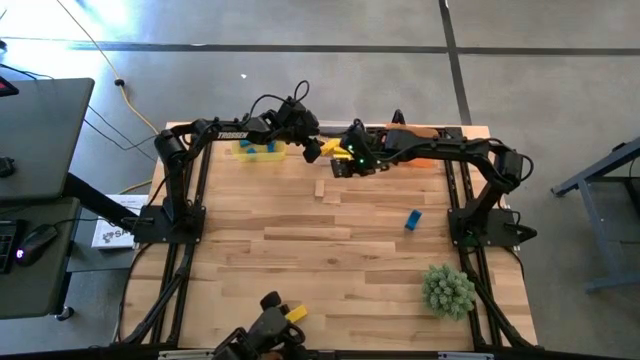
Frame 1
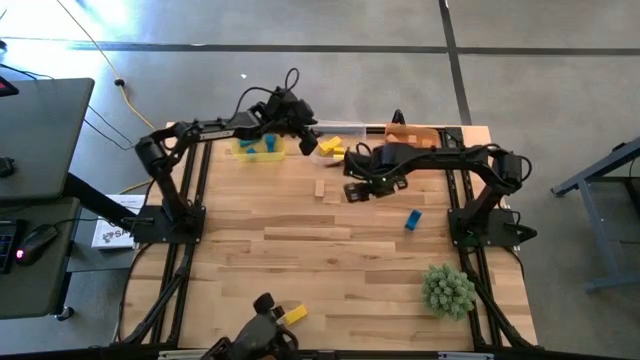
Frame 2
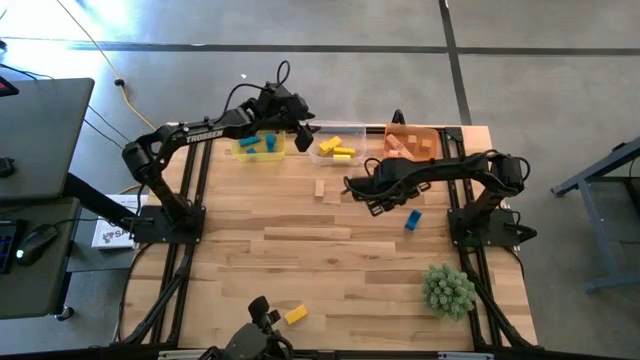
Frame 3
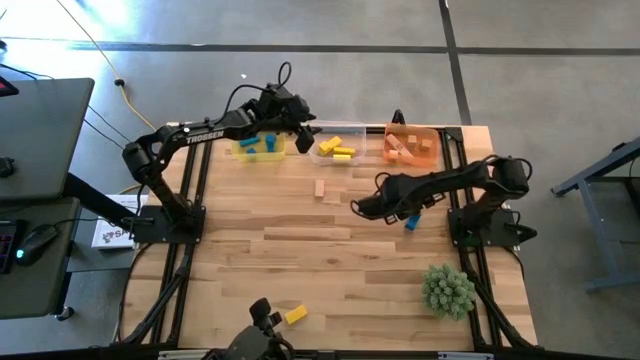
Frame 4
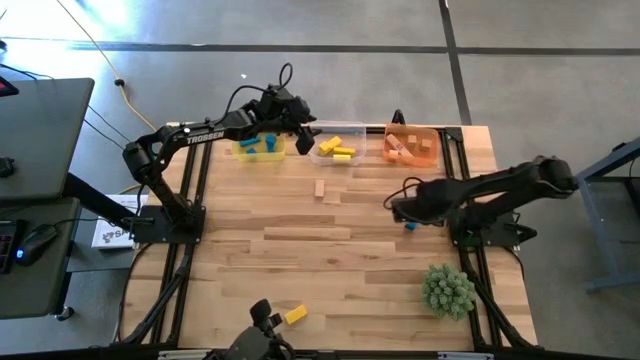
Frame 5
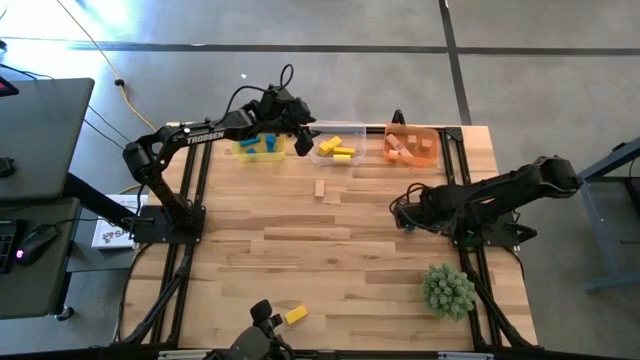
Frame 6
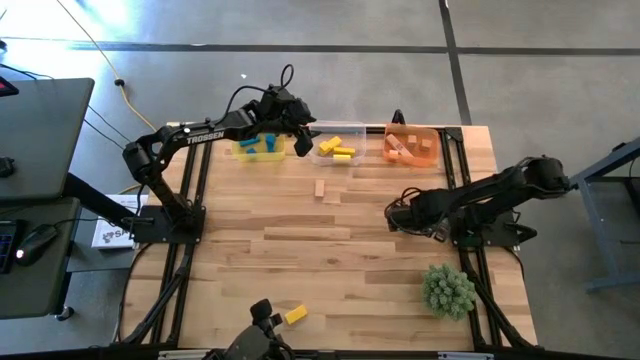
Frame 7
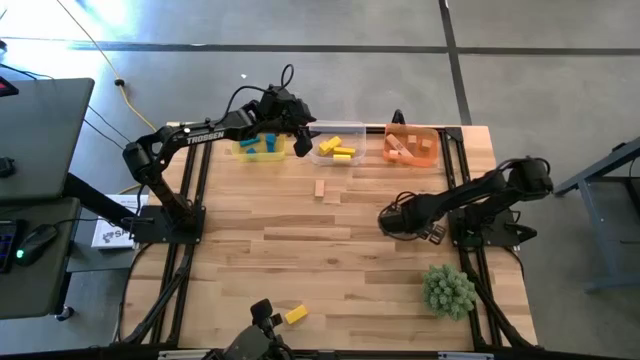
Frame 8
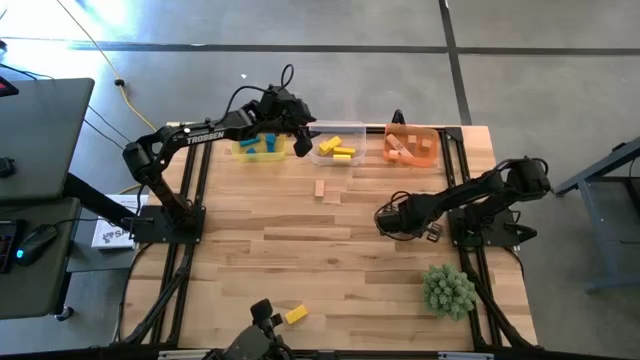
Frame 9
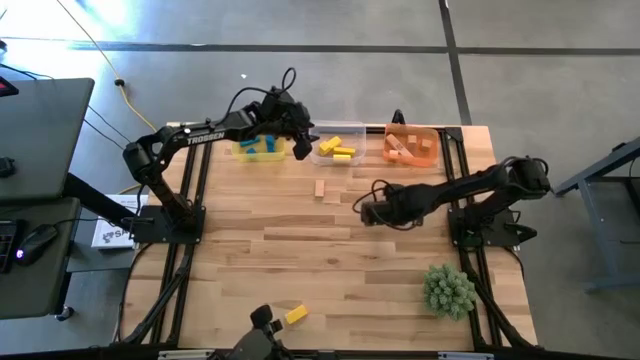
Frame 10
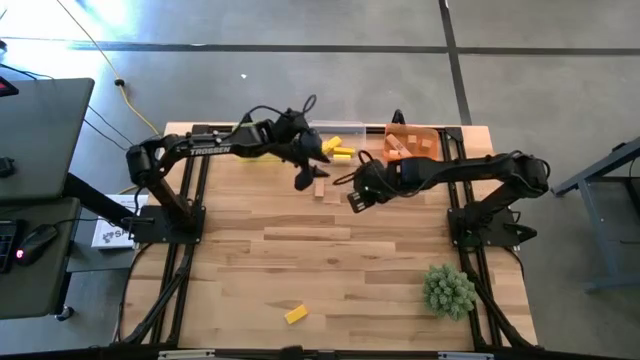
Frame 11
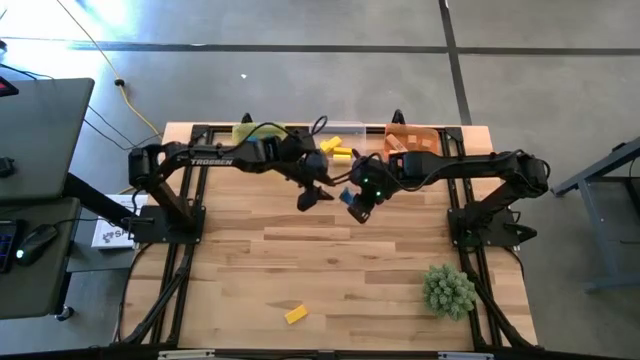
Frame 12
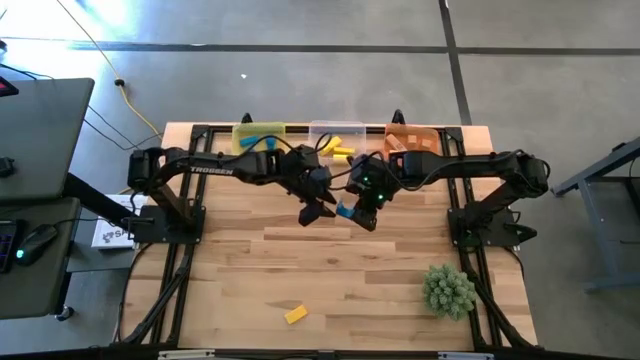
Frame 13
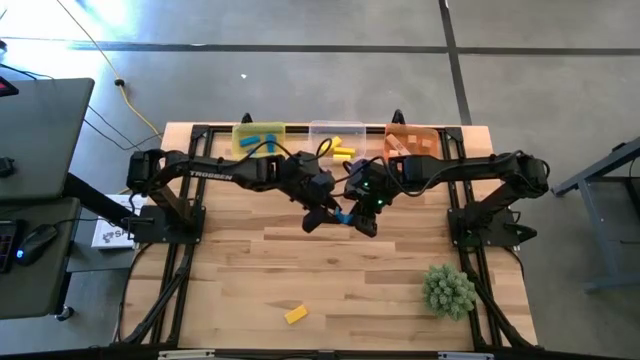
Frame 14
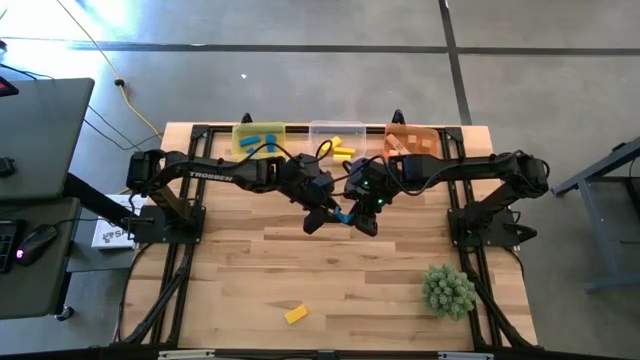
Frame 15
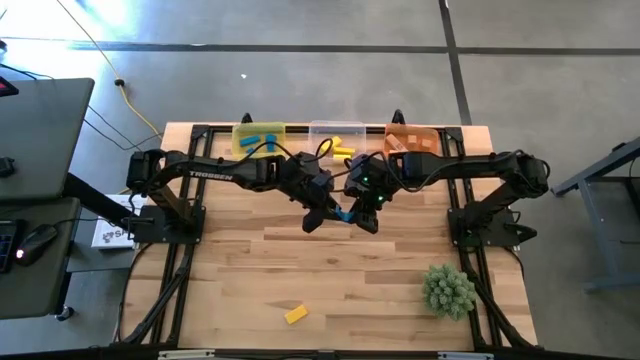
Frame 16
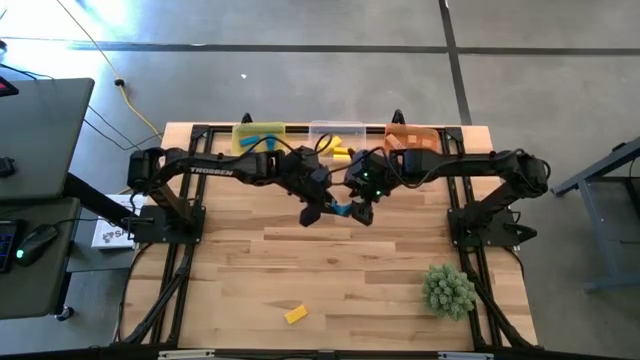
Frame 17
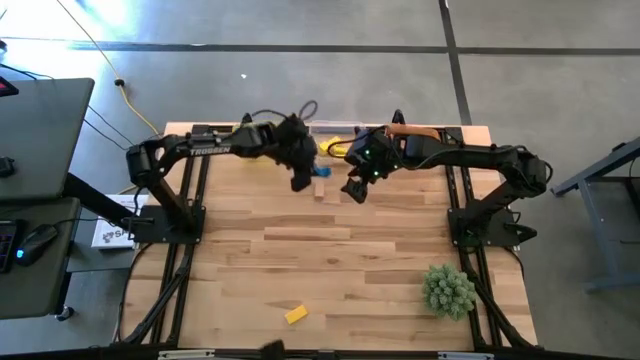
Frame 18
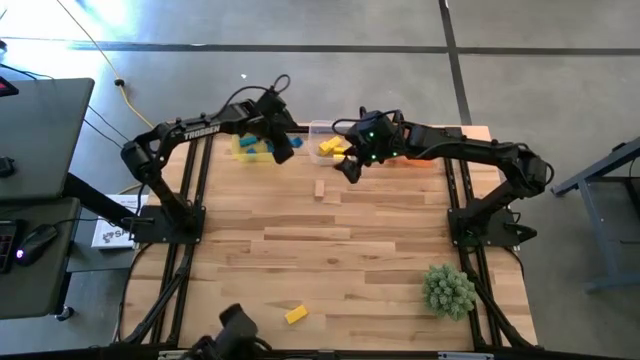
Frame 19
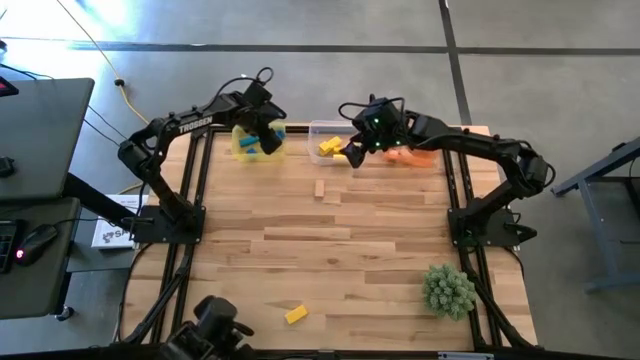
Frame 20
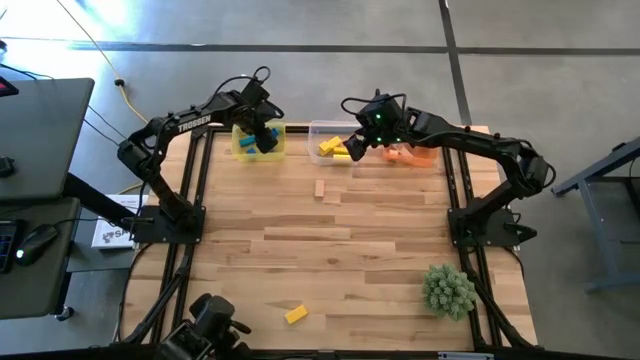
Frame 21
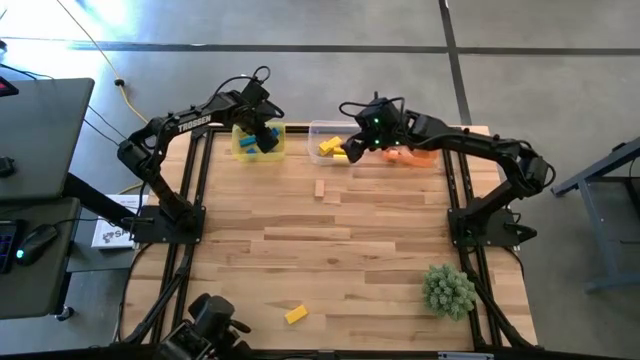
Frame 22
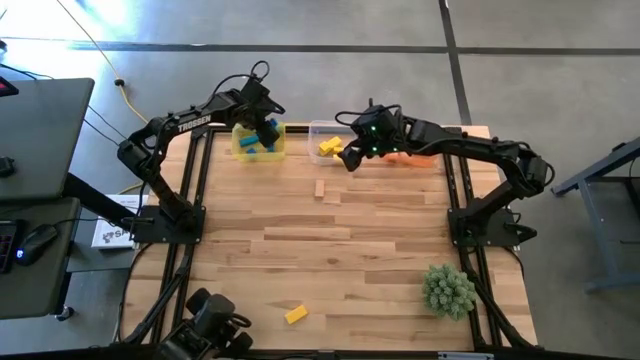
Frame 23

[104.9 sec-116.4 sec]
Task: Sort & place blocks by color
Put the blue block into the yellow bin

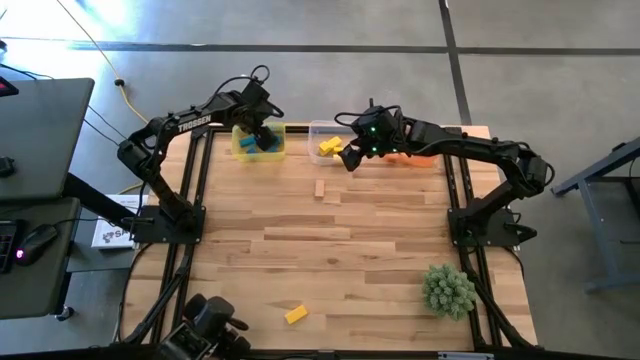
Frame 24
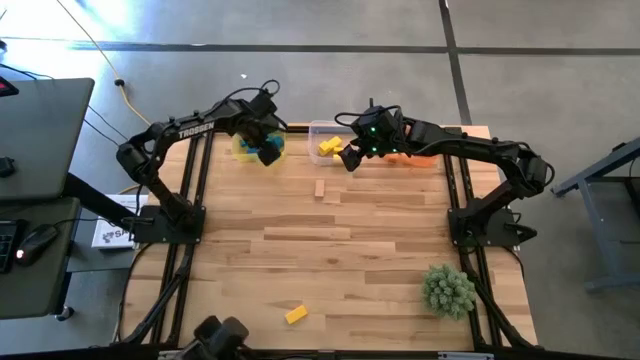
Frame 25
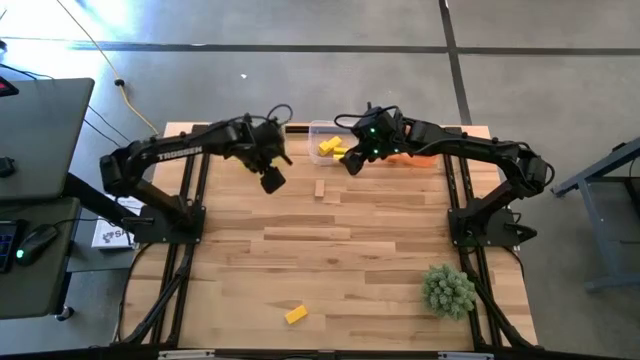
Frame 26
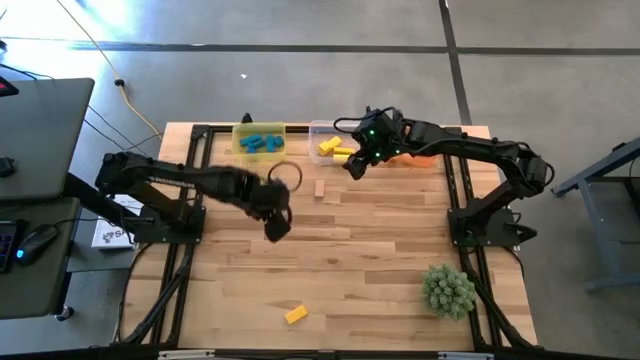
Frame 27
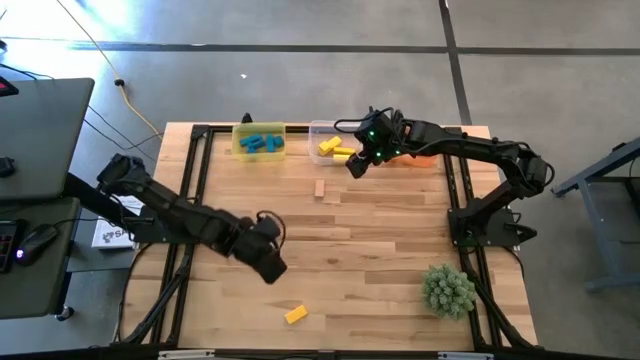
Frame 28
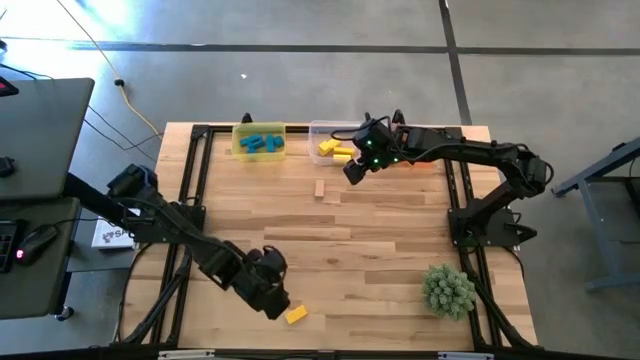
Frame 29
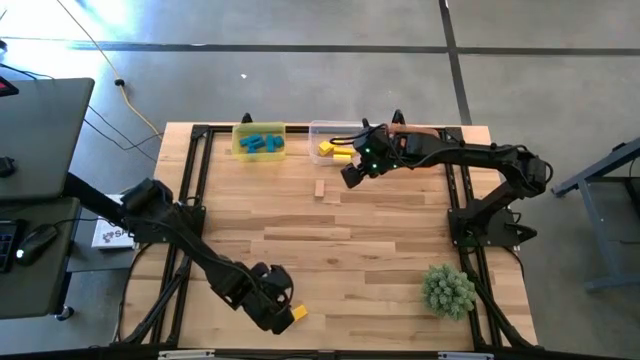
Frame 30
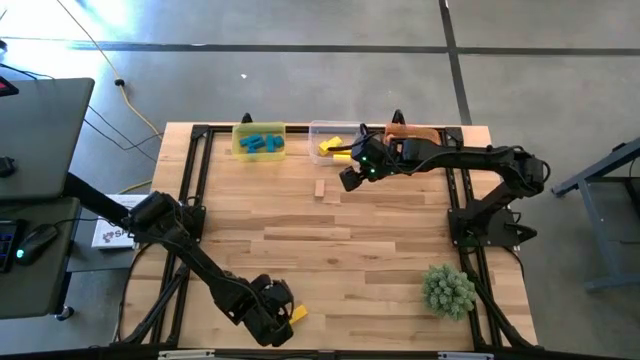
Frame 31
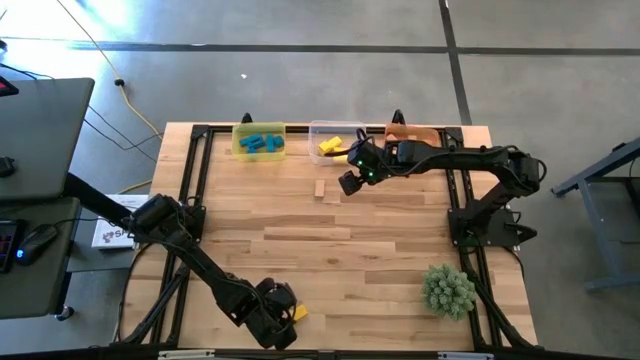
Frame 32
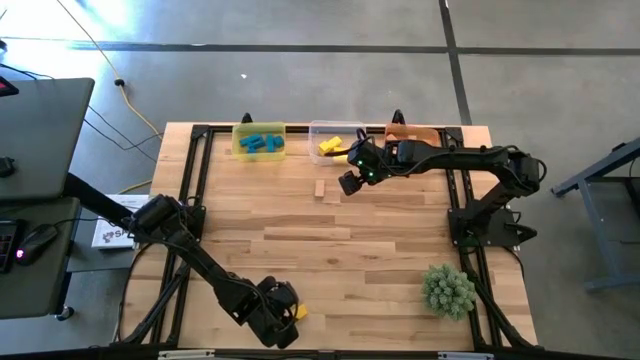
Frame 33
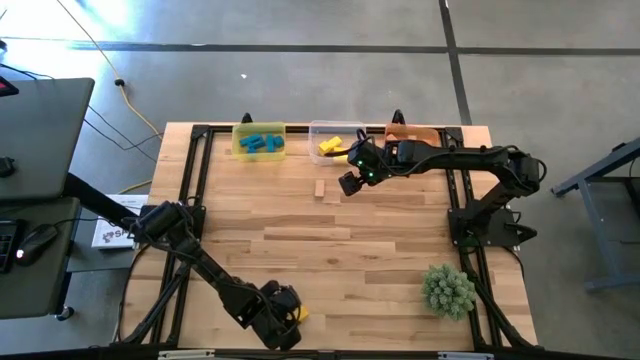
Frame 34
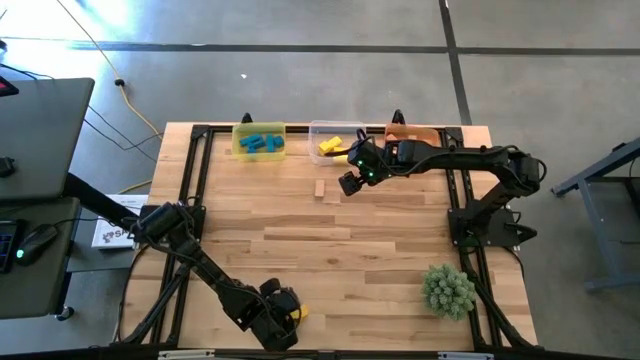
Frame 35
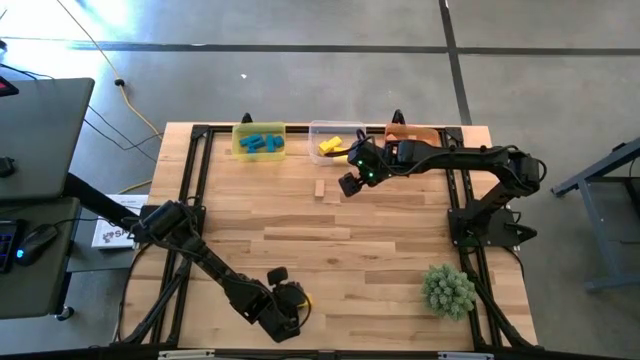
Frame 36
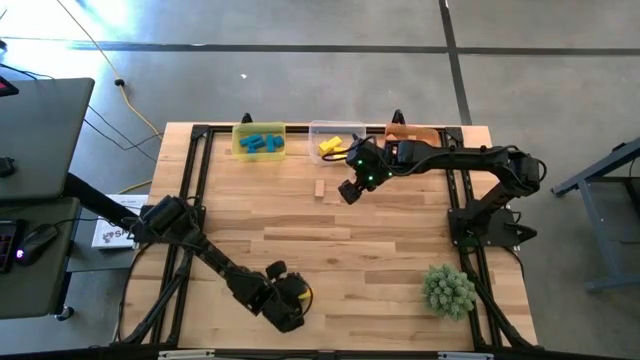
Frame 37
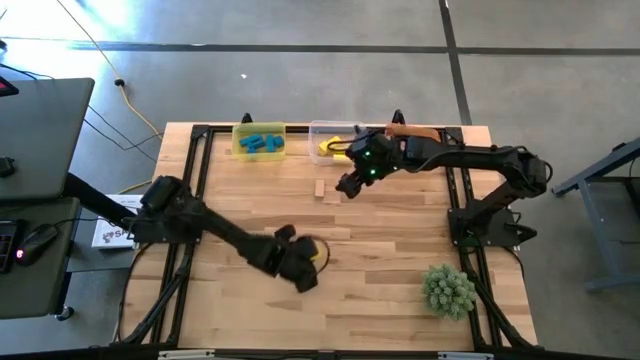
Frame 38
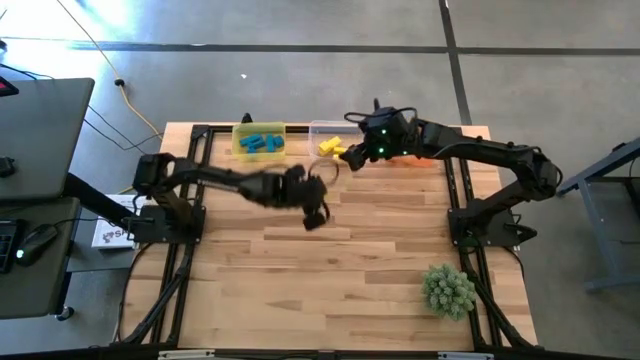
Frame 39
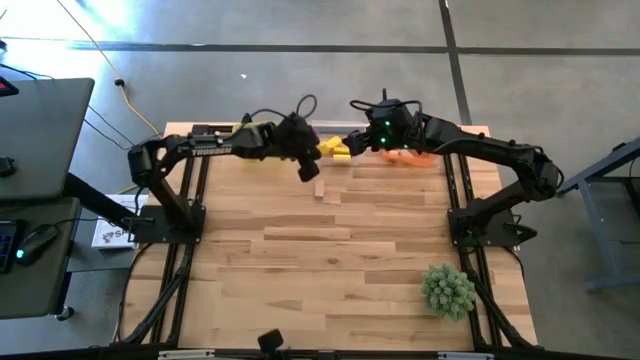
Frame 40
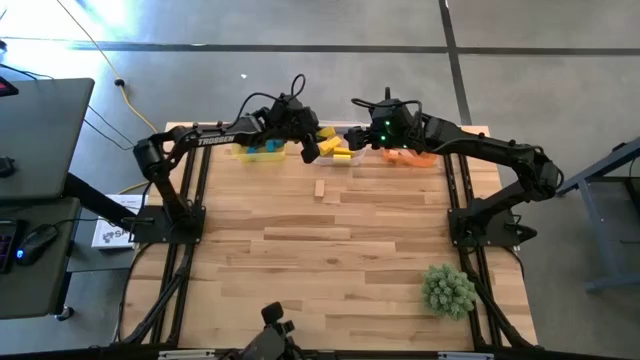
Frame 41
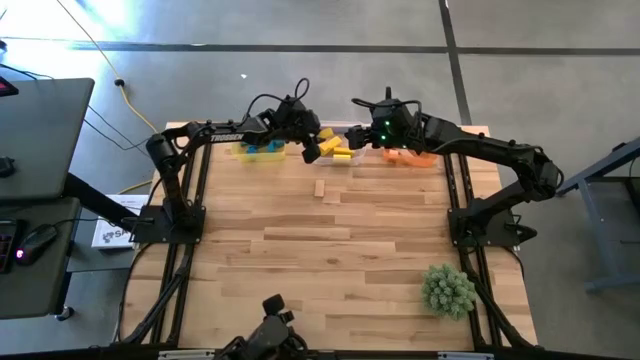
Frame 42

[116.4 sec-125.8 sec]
Put the yellow block into the transparent bin

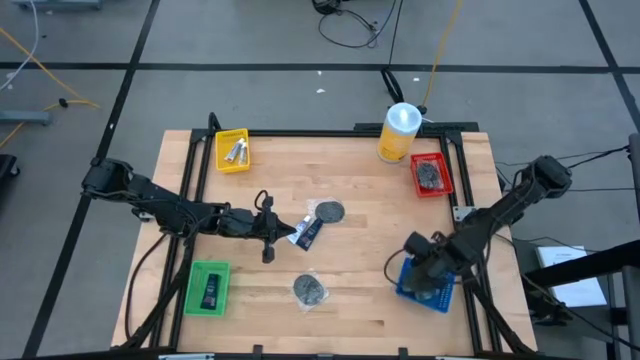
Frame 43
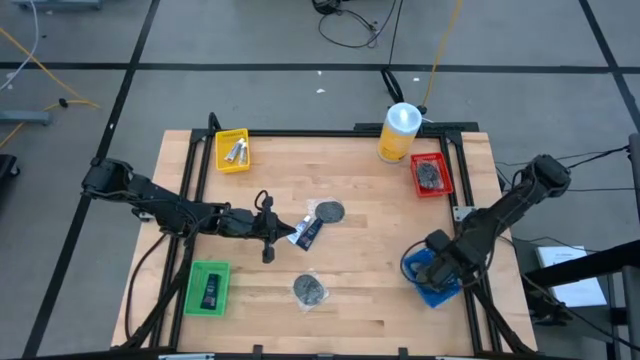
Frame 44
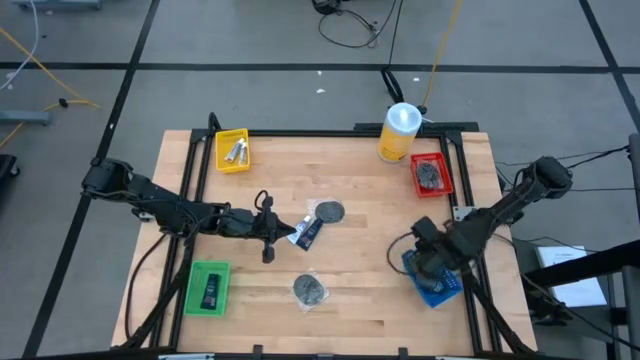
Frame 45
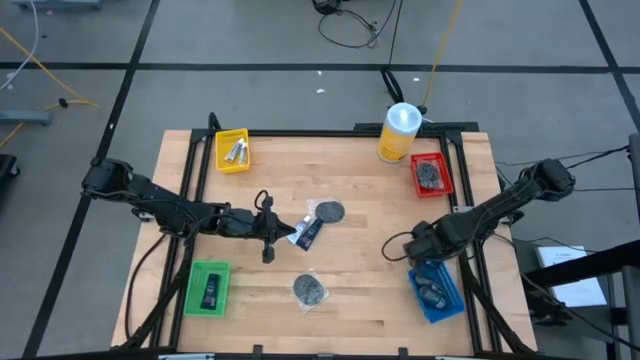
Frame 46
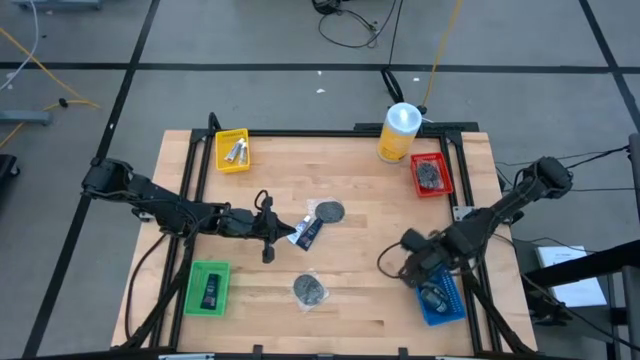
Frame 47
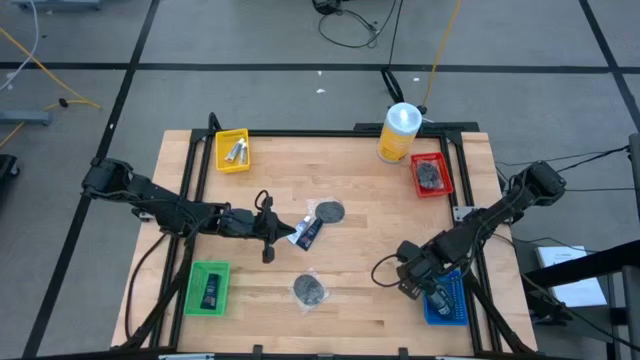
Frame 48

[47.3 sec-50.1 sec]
Task: Pick & Place Travel size toiletries
Adjust the blue bin
